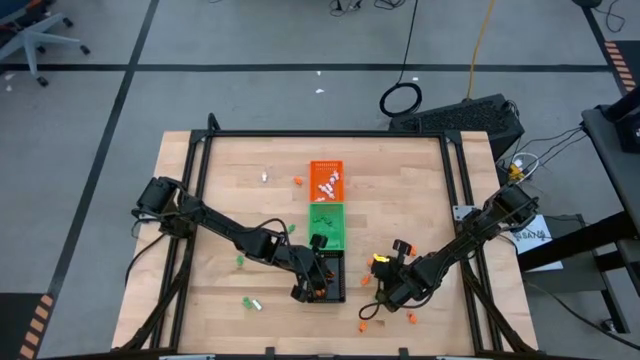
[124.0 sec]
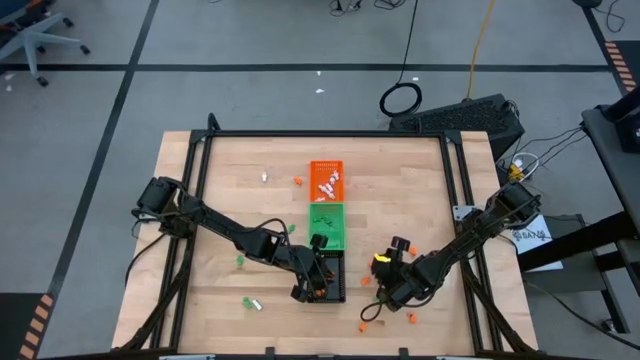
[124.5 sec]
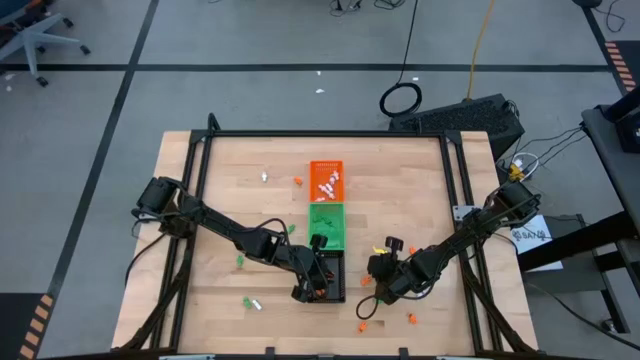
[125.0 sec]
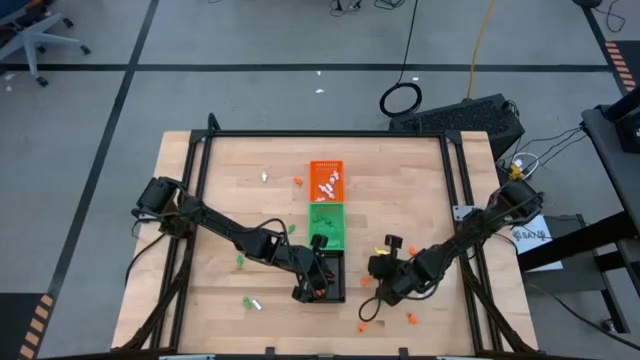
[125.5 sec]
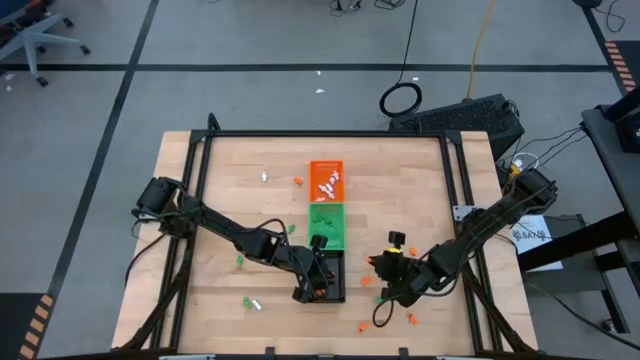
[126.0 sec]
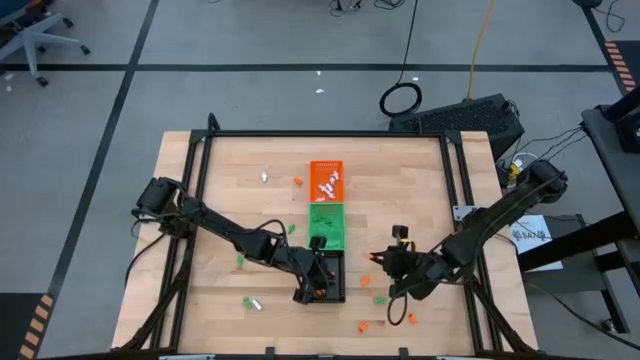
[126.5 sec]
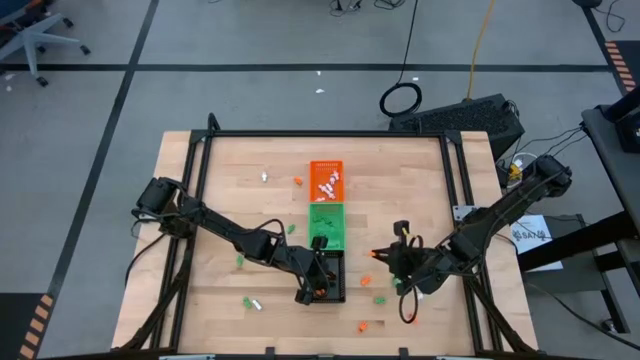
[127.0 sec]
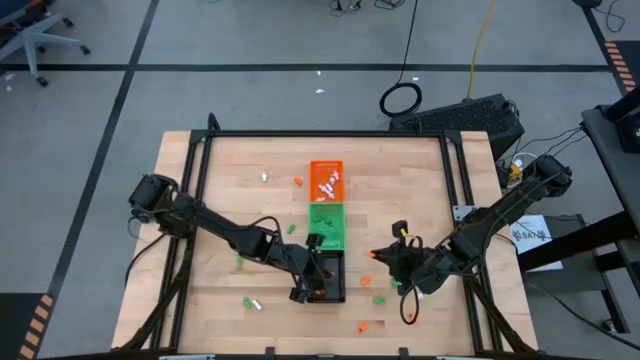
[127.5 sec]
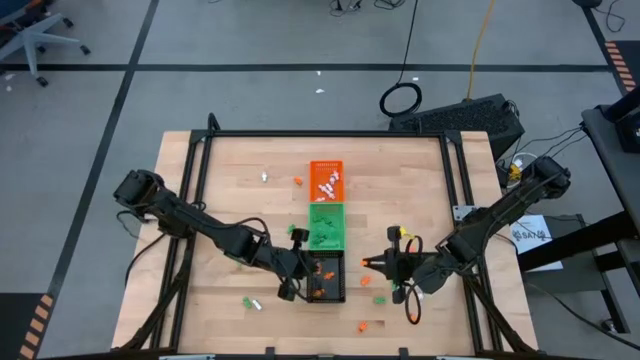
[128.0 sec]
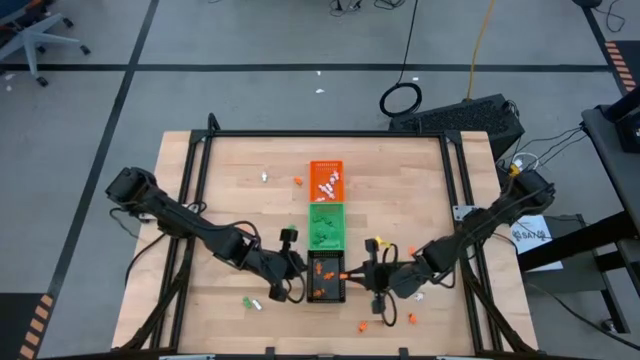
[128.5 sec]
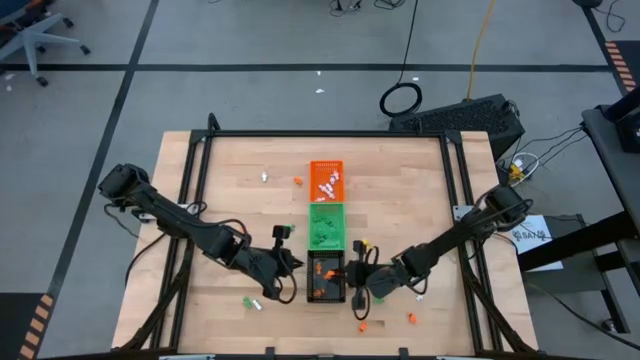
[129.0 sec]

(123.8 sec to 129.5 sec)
Task: Sort Halloween decoration
Put the orange skeleton toy into the black bin

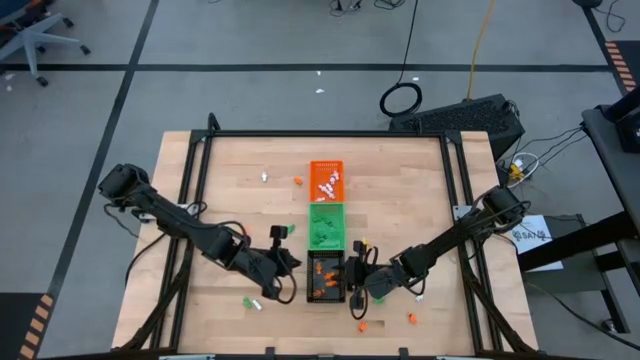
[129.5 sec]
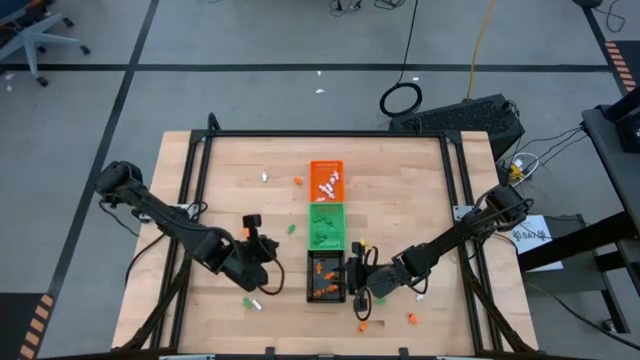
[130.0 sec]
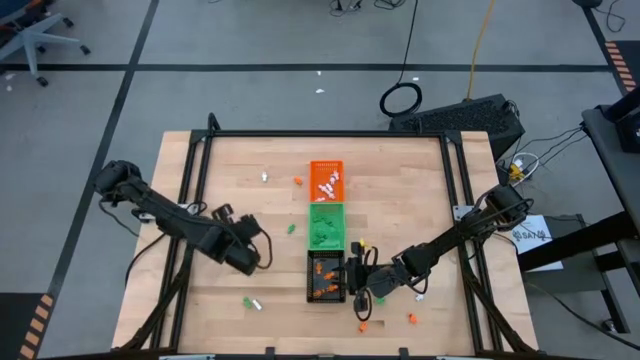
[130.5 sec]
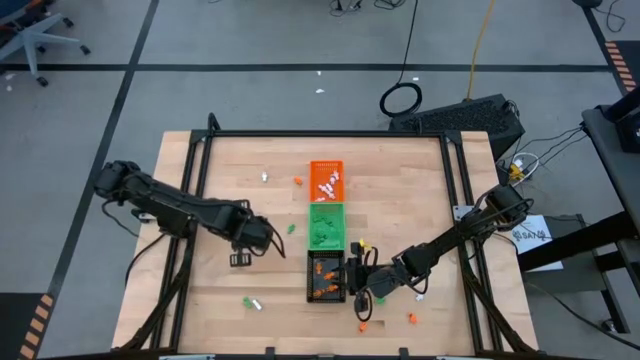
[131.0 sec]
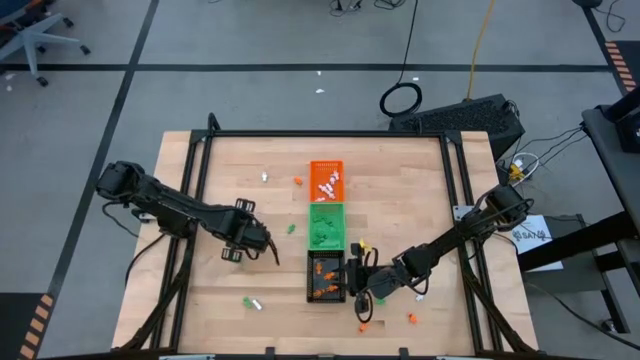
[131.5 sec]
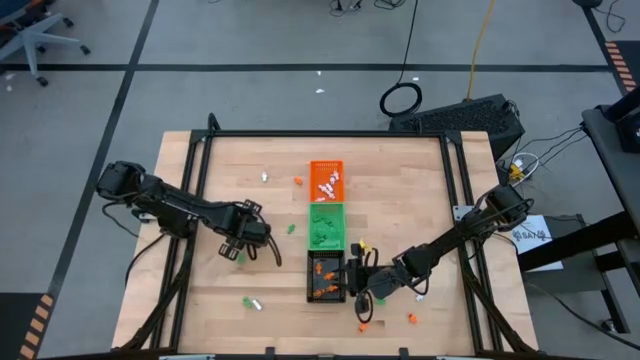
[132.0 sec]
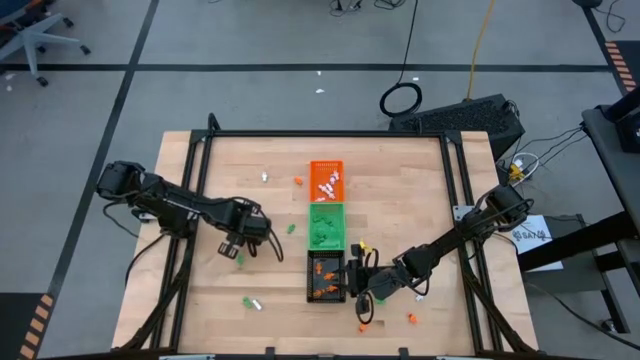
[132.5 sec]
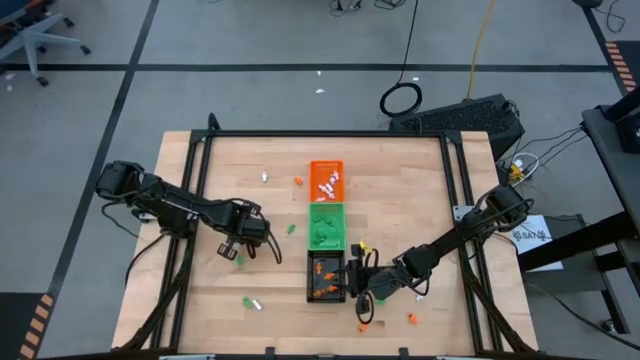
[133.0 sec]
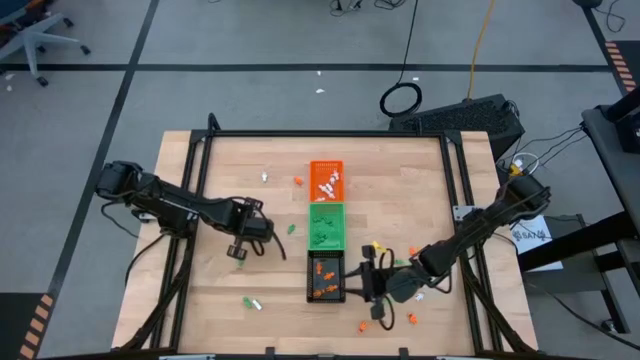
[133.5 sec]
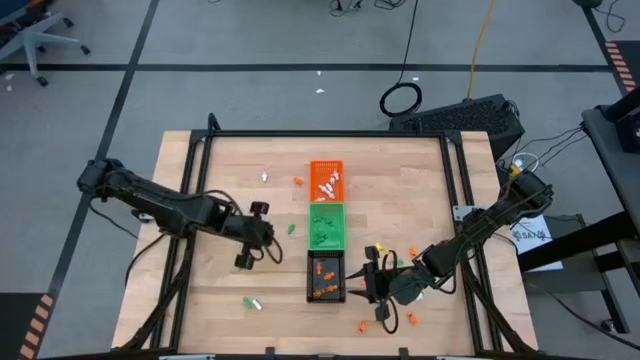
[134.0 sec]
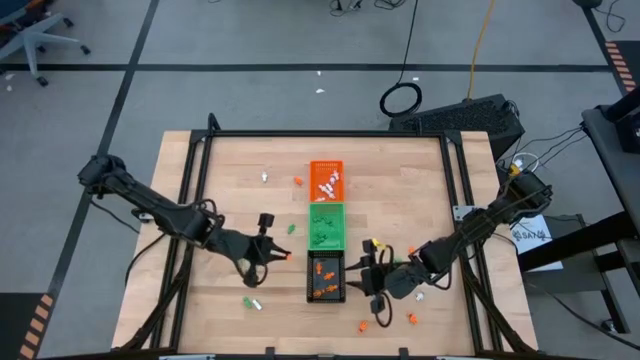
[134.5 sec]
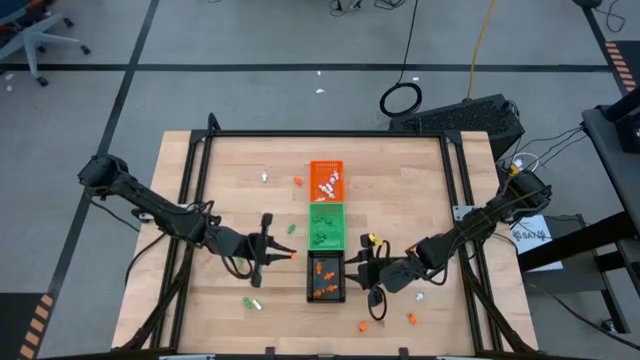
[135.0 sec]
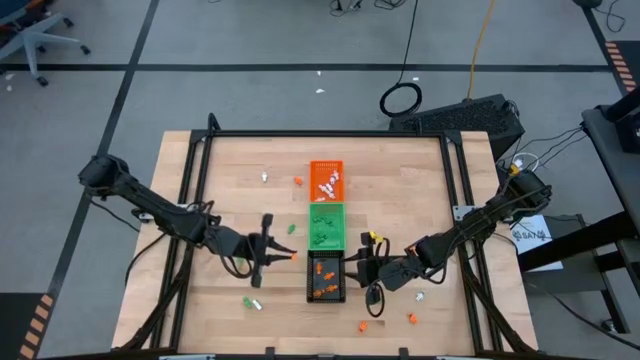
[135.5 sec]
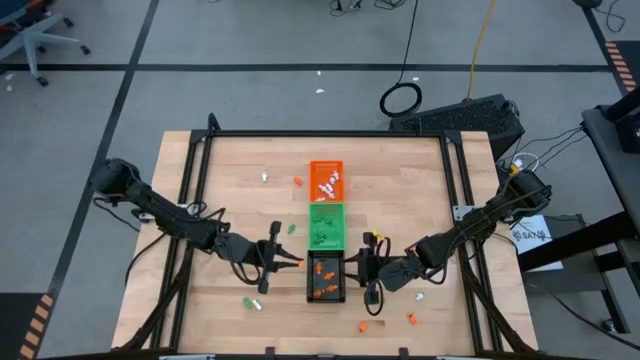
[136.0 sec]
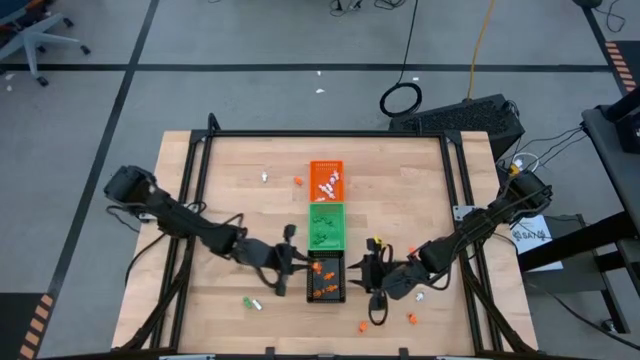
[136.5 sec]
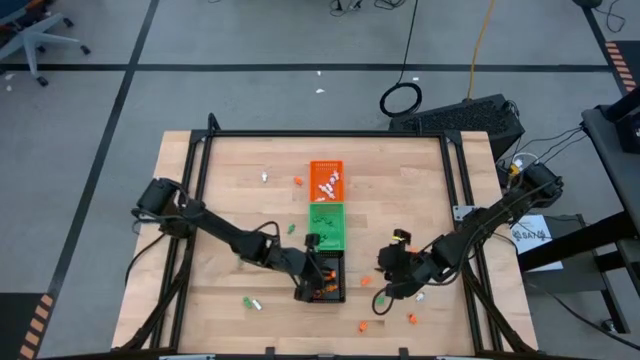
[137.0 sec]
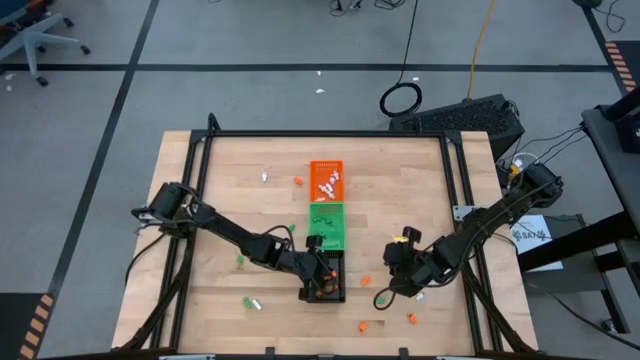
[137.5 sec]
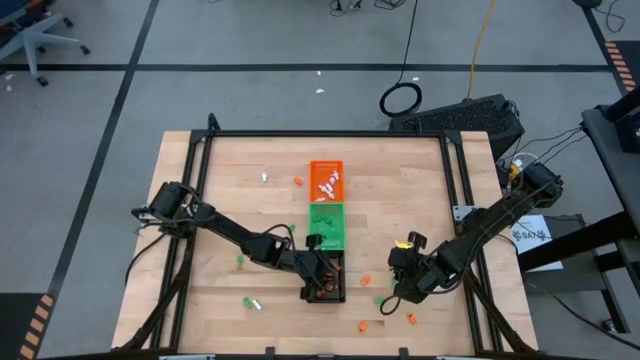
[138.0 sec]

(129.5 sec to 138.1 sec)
Put the orange skeleton toy into the black bin

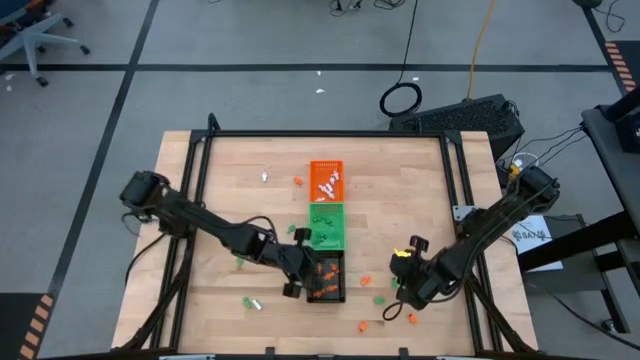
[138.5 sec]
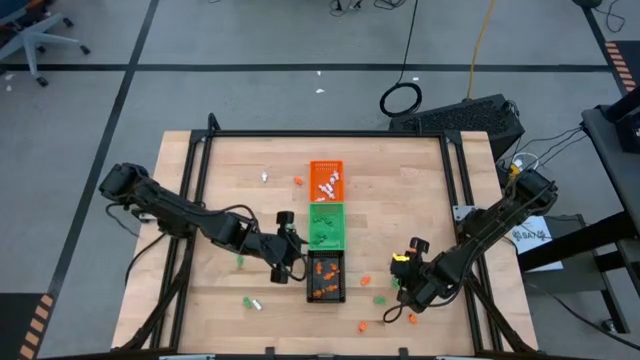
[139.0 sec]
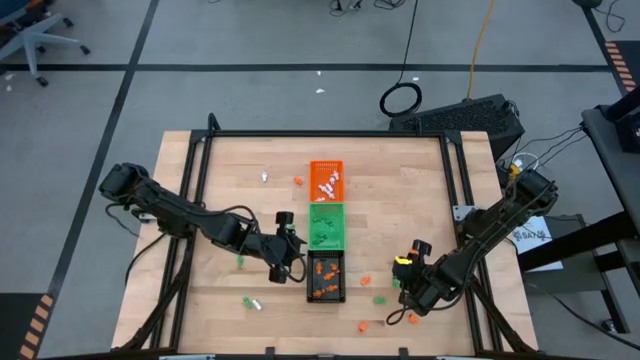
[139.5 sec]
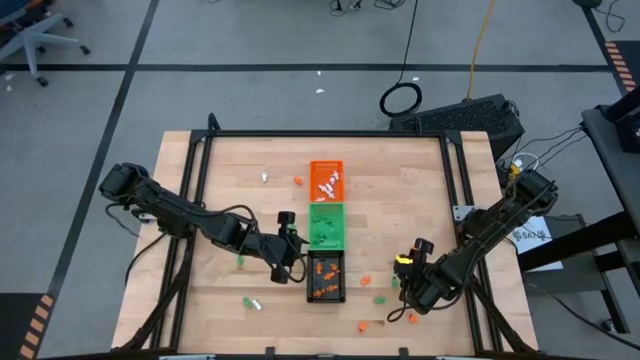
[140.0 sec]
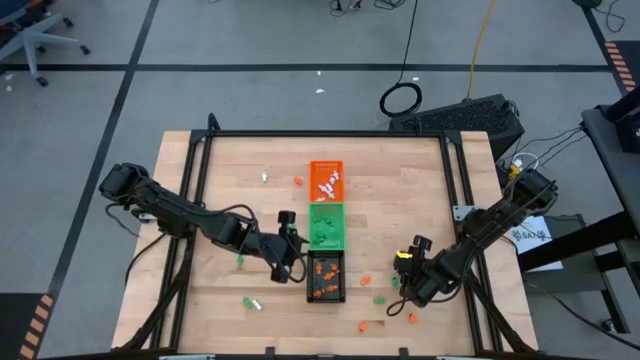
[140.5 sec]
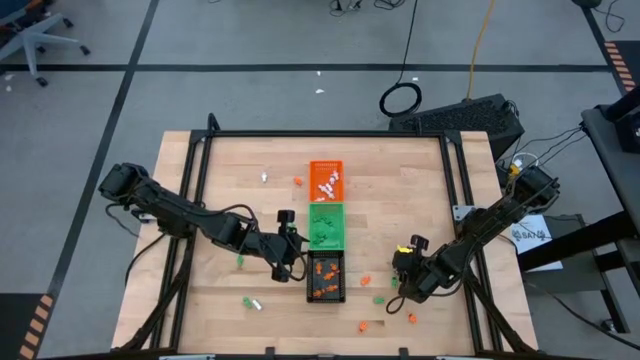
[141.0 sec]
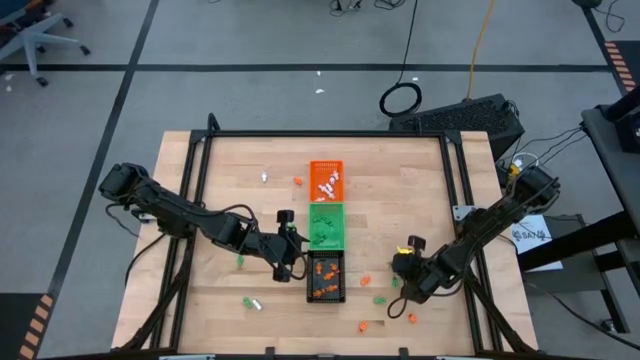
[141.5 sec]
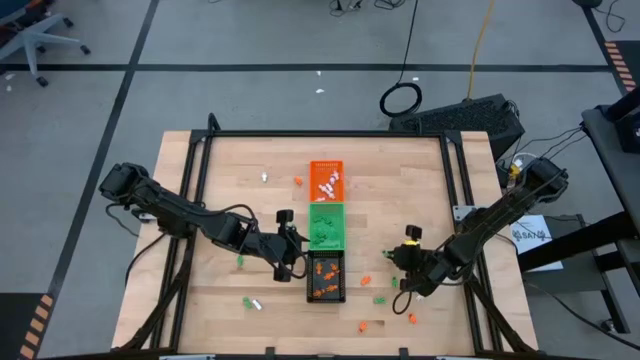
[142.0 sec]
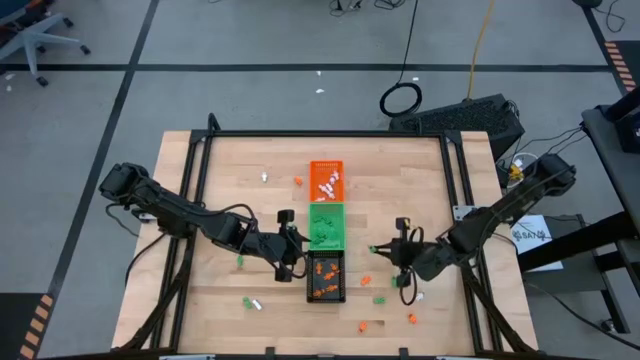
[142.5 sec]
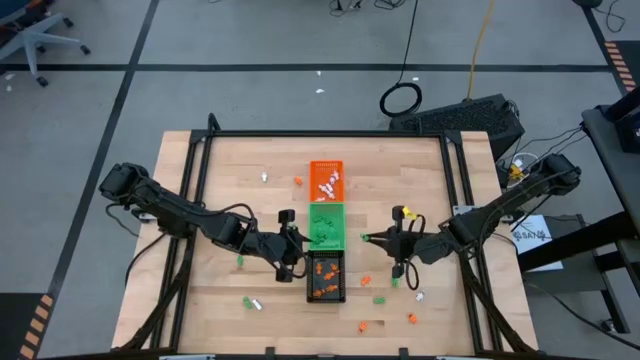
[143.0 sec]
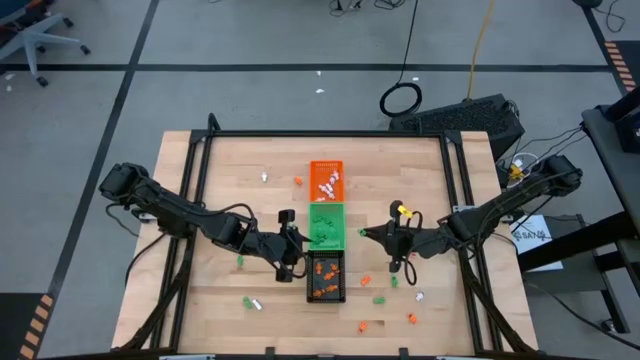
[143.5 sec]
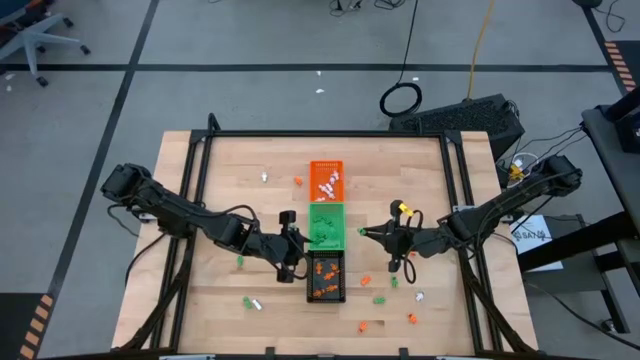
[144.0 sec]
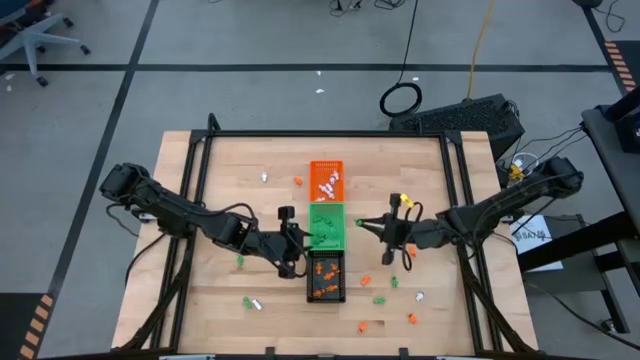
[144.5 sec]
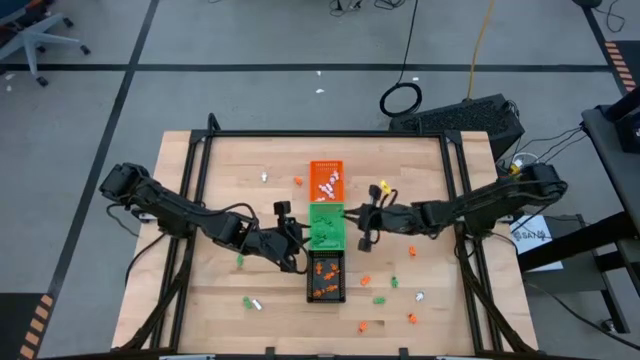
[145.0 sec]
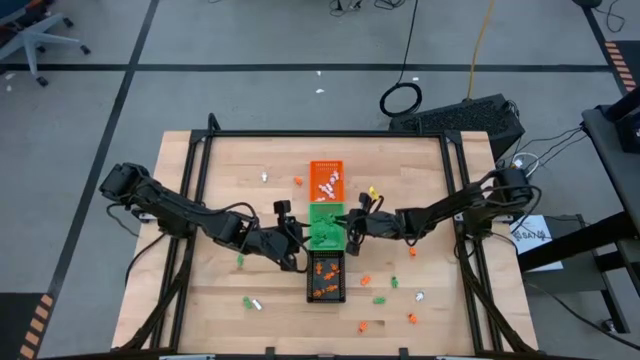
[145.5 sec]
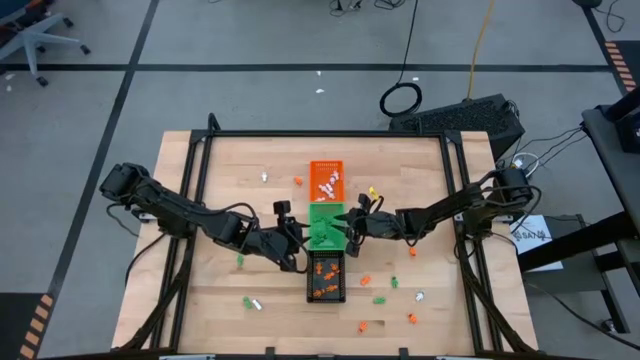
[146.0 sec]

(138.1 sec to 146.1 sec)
Put the green skeleton toy into the green bin
